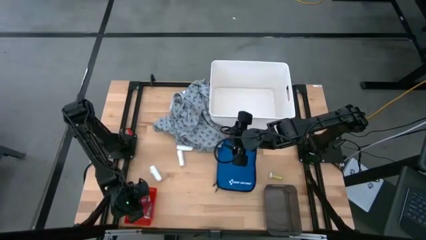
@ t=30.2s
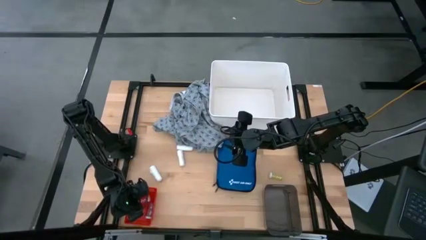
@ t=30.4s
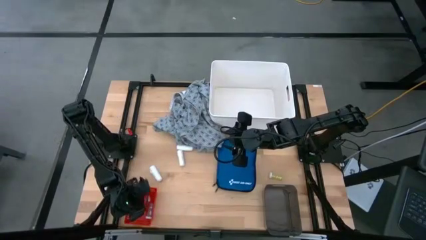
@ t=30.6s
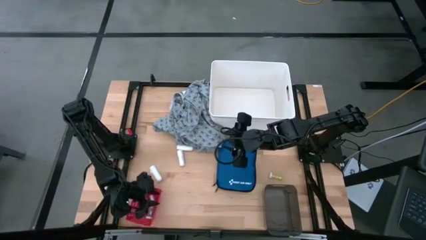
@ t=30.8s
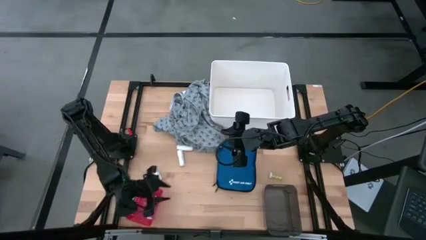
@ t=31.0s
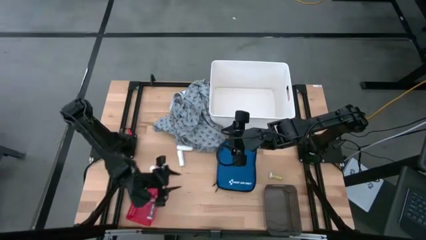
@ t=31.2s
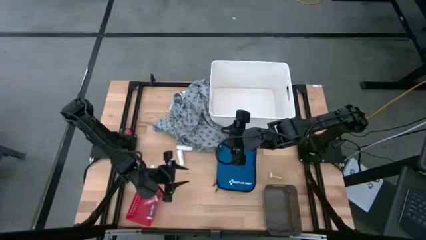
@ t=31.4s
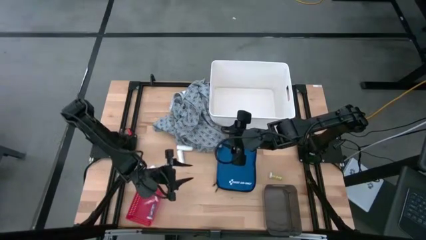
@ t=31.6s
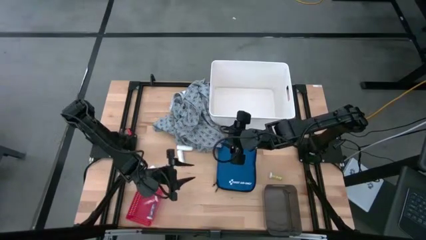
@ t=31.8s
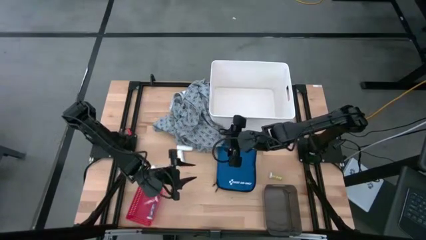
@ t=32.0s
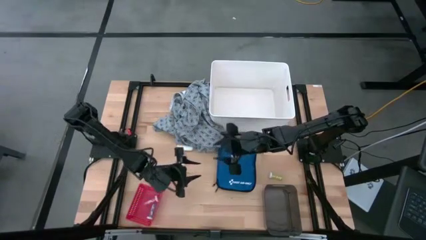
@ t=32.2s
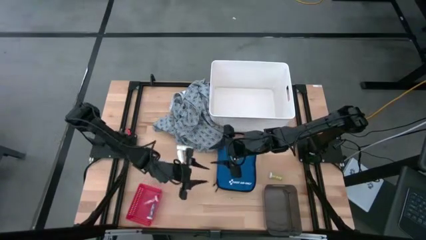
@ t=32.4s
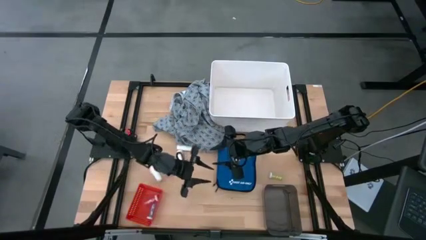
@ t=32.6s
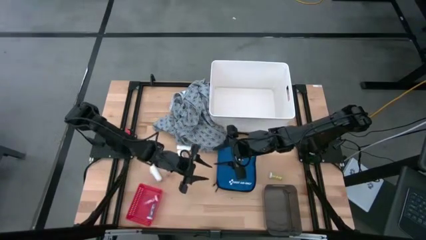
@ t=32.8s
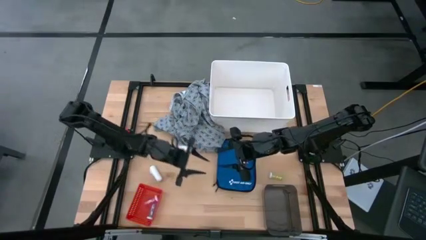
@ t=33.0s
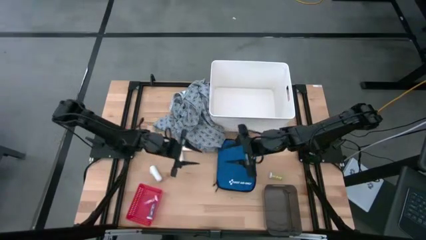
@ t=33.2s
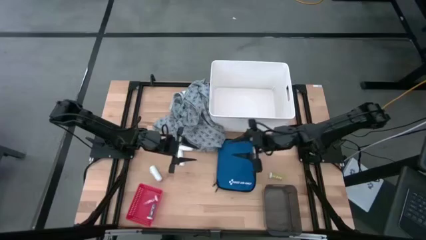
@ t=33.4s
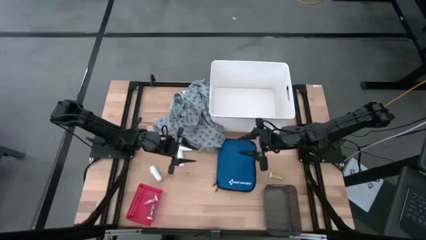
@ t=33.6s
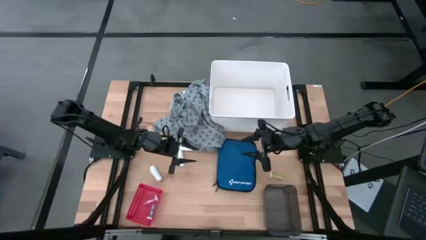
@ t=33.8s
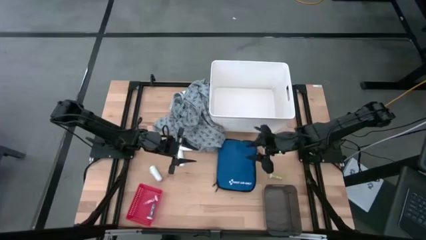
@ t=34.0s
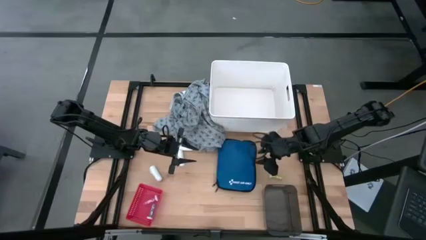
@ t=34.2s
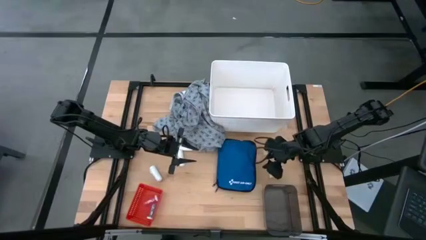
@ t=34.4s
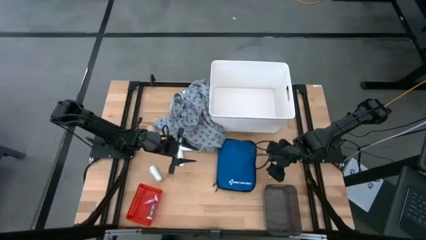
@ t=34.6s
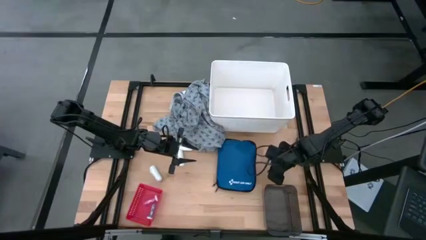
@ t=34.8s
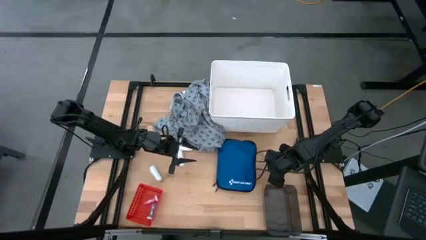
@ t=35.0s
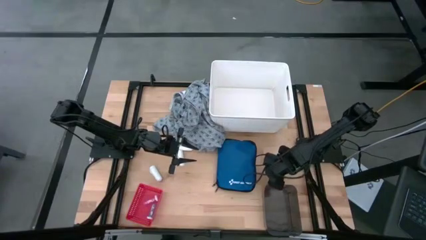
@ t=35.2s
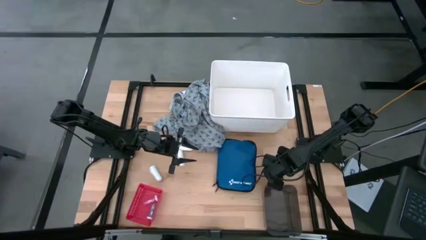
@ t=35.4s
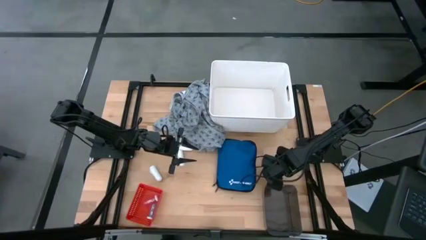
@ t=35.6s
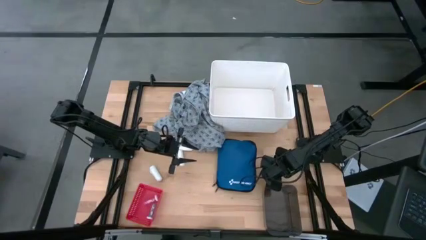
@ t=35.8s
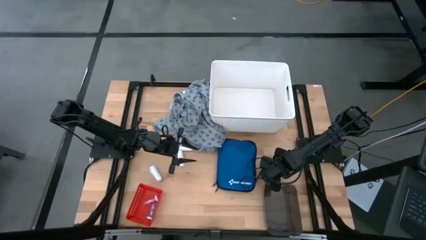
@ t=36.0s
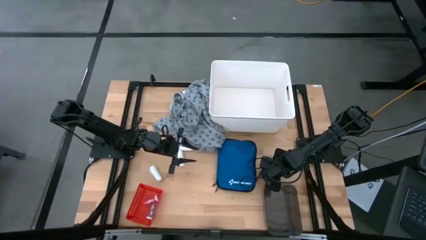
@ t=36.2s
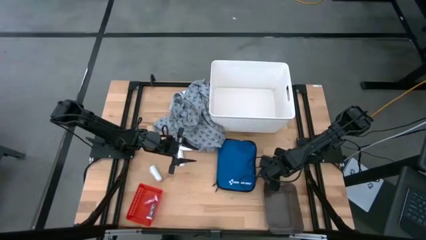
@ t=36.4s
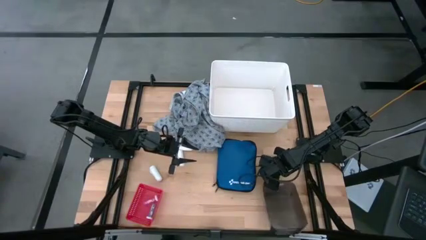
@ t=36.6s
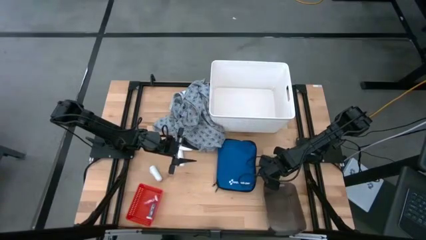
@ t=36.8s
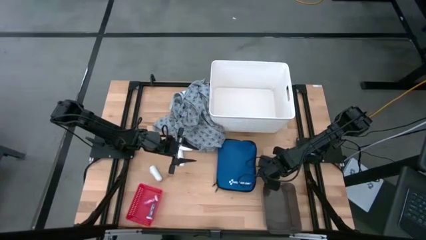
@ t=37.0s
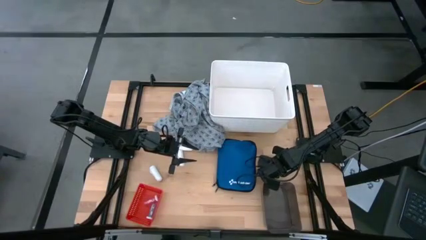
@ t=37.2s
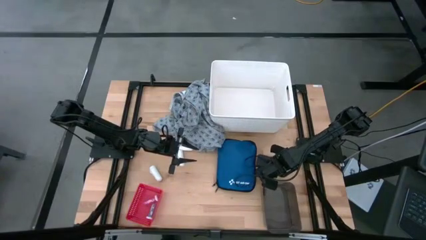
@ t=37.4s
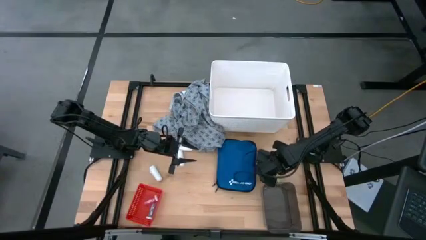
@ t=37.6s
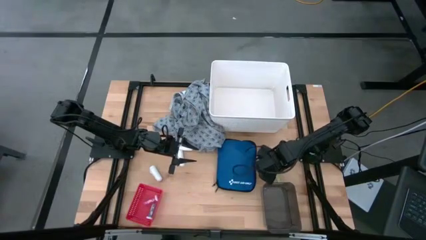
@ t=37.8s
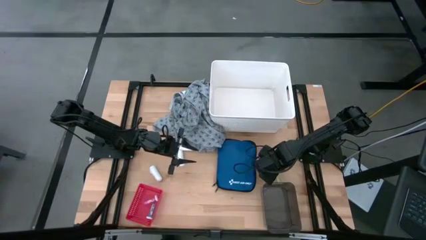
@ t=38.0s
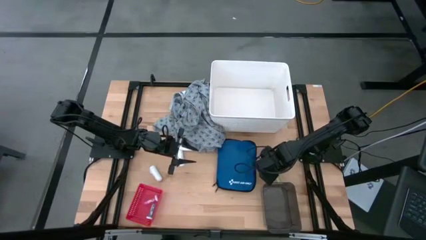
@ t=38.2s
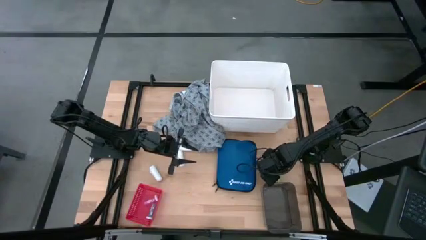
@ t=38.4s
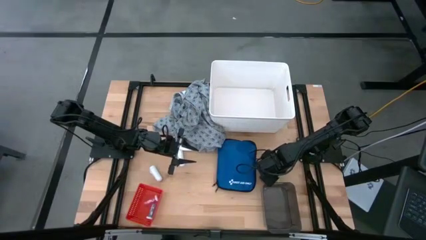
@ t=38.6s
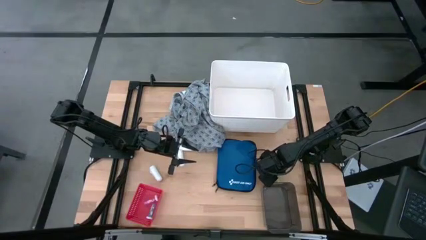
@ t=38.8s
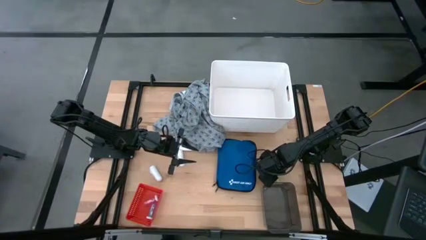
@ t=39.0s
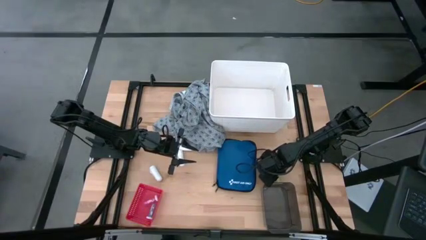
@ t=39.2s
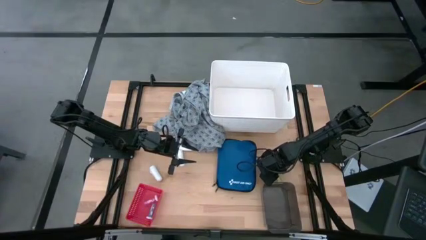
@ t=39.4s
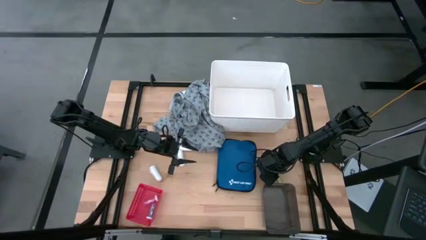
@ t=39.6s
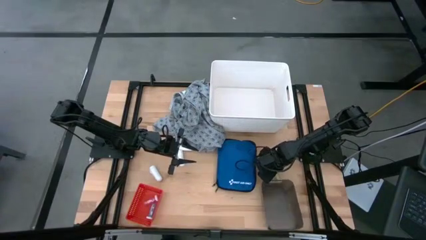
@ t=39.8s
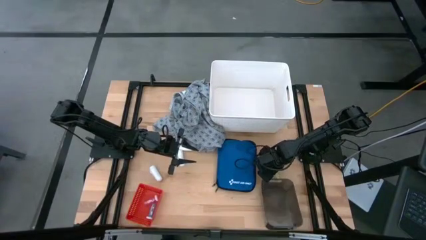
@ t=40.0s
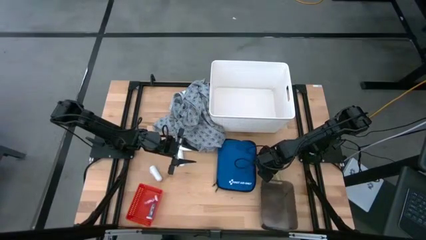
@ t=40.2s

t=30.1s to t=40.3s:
Task: Pick & Place Medicine items
Put the yellow pill bottle into the red bin

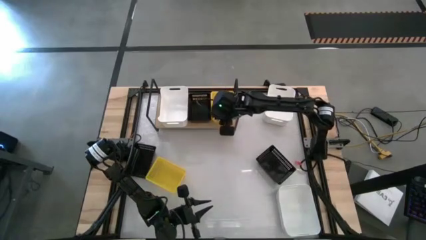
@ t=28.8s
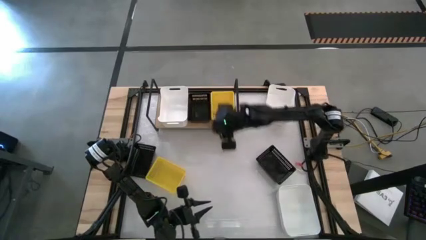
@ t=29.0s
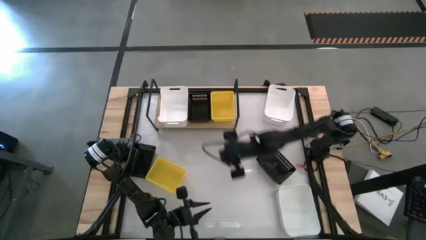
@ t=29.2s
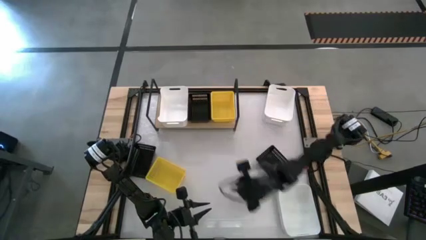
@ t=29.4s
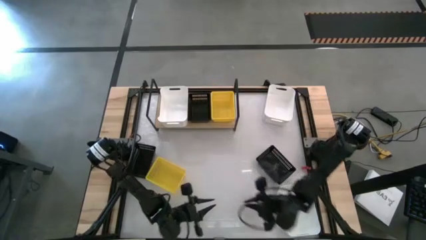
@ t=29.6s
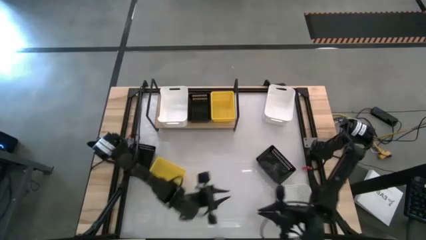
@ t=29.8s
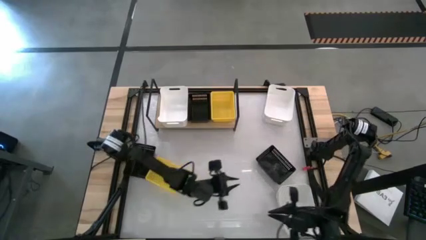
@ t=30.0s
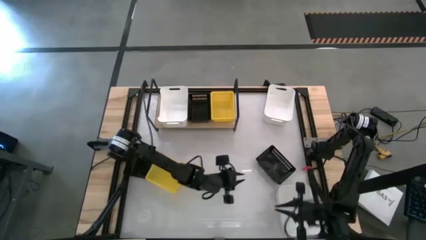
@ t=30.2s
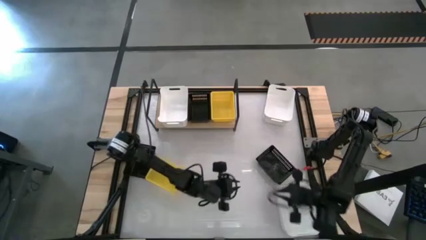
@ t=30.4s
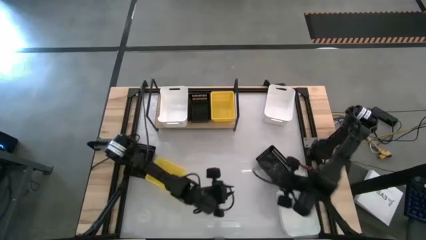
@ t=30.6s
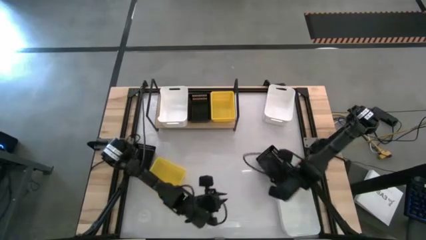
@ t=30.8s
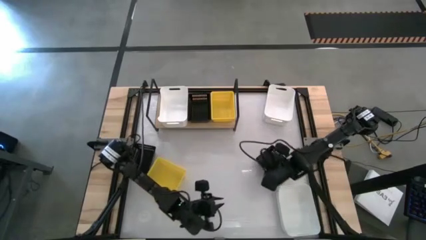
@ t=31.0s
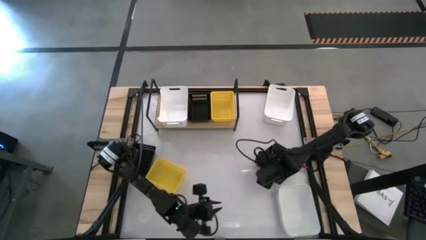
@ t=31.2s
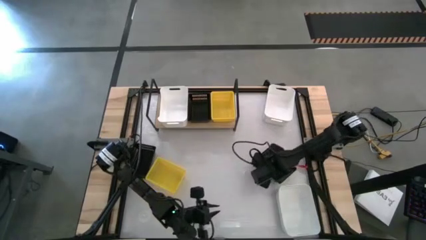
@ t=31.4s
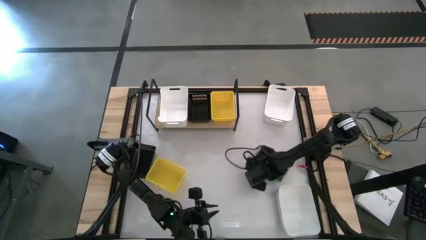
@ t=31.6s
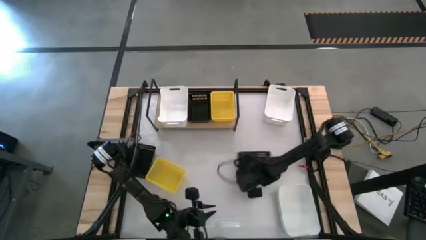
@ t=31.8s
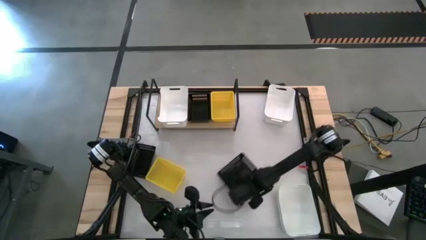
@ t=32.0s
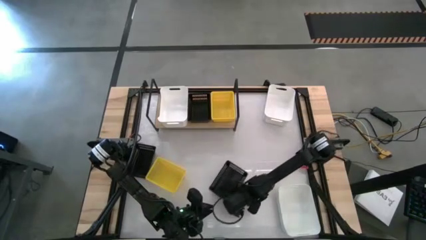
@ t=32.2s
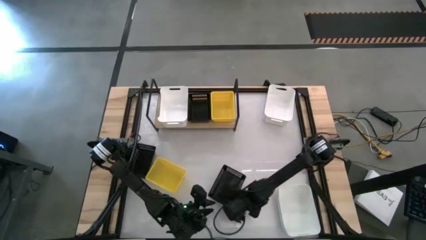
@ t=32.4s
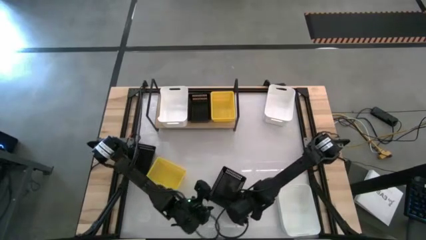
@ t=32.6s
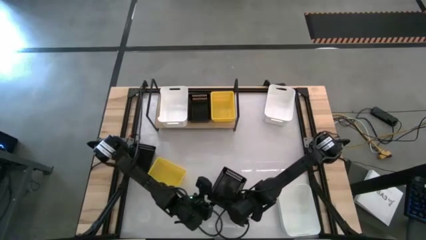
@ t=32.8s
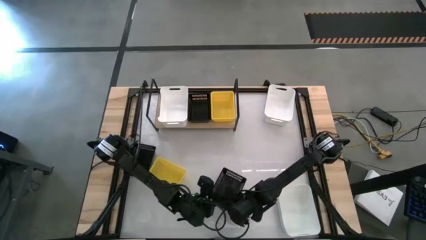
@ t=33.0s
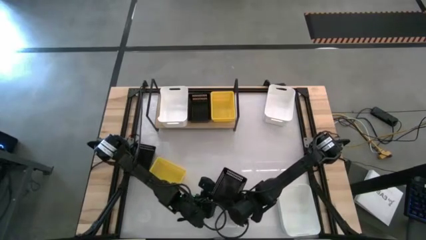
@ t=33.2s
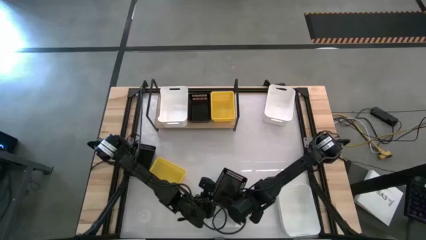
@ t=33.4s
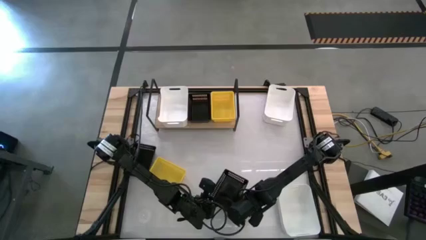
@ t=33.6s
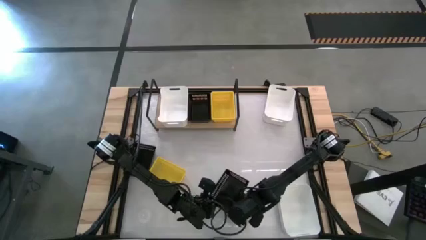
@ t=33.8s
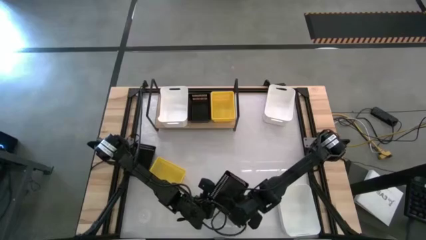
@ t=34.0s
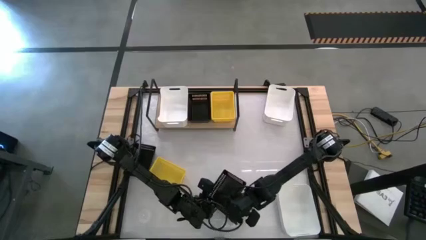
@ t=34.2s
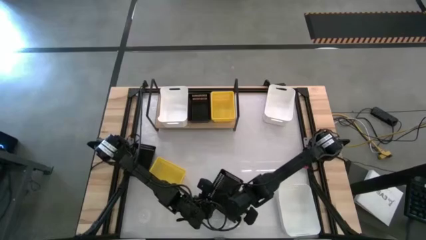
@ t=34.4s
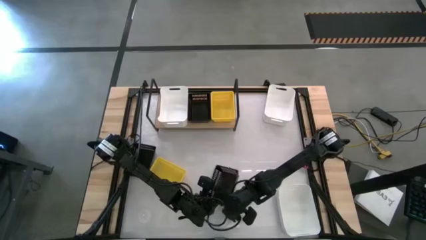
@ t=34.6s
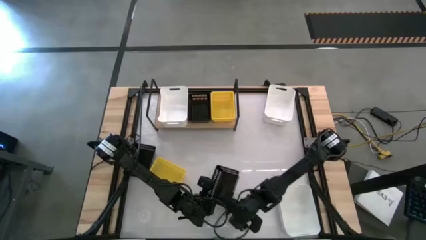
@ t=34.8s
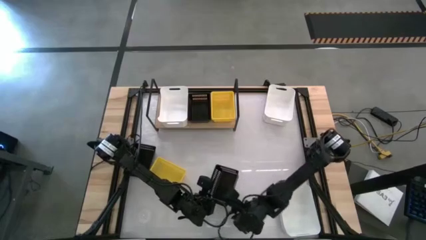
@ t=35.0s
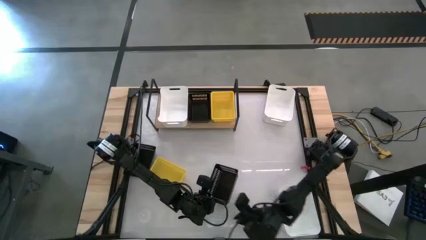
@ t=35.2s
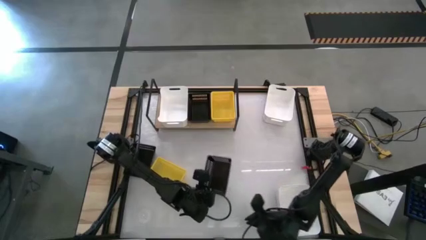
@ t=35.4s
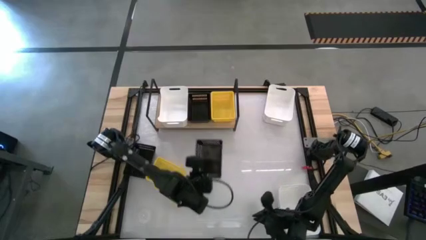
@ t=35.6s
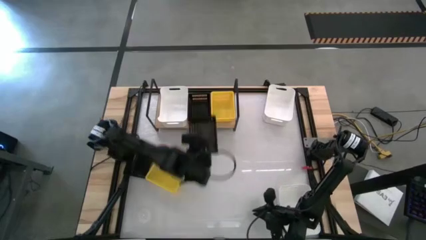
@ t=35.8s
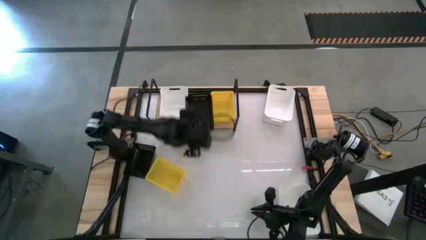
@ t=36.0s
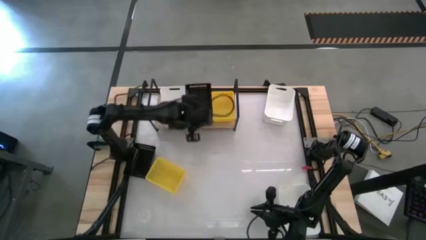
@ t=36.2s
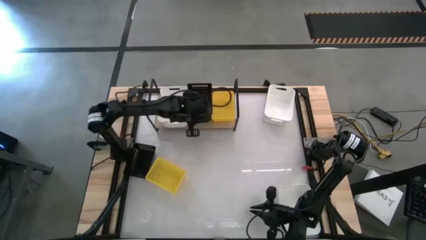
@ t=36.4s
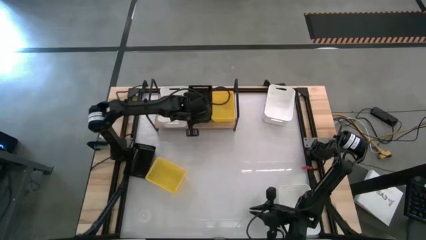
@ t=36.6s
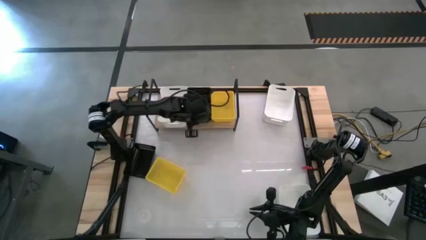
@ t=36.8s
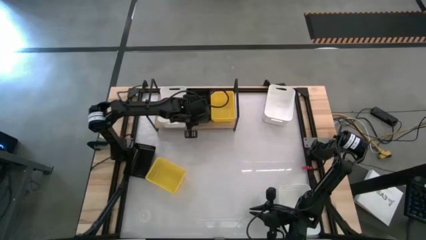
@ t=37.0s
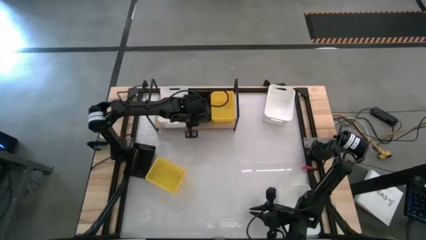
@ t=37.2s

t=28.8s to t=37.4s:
Task: Stack baskets on shelf by color
Stack the right black bin on top of the black bin
